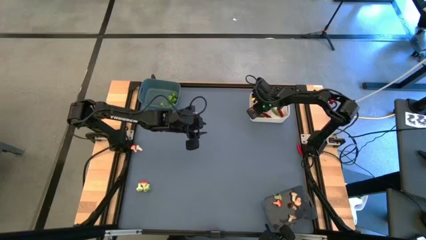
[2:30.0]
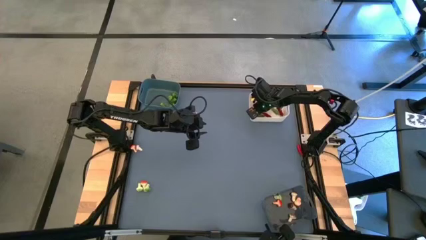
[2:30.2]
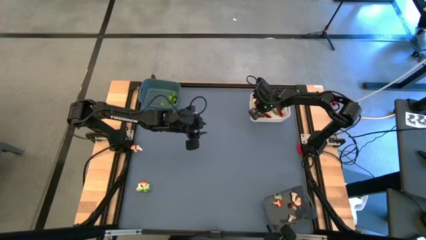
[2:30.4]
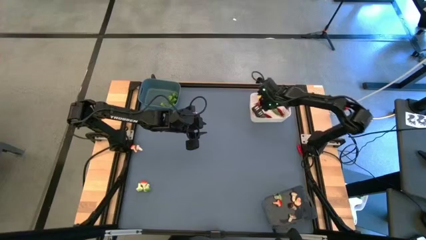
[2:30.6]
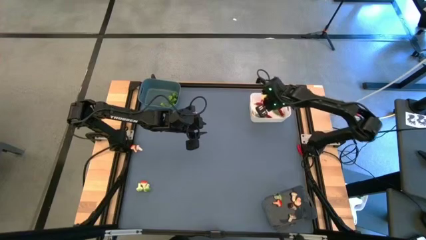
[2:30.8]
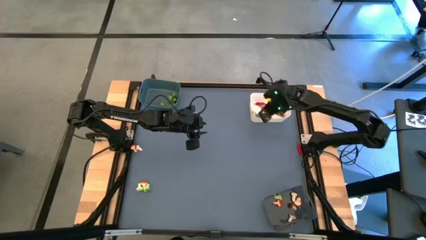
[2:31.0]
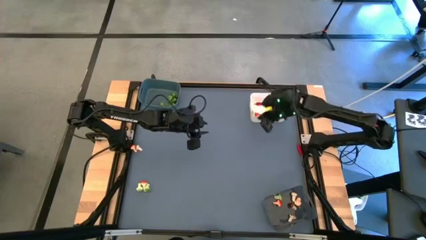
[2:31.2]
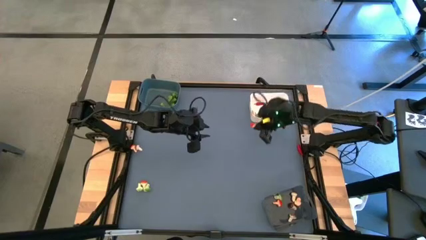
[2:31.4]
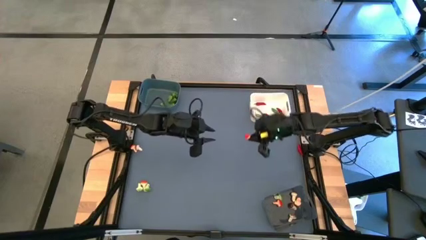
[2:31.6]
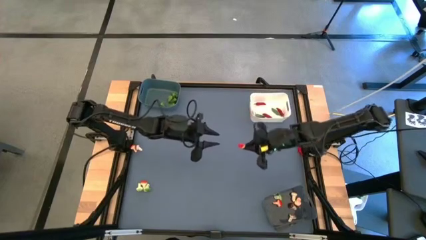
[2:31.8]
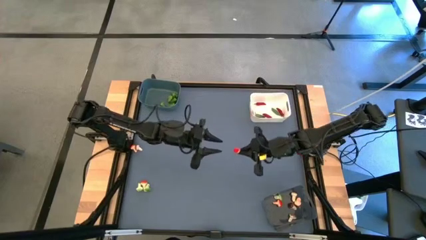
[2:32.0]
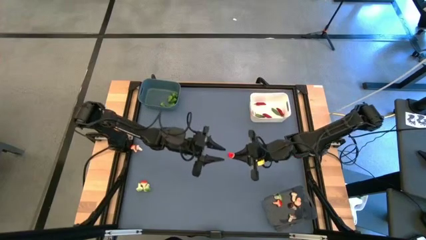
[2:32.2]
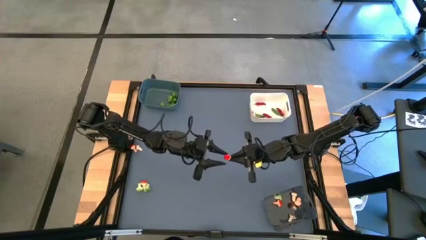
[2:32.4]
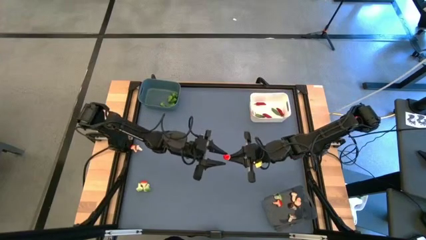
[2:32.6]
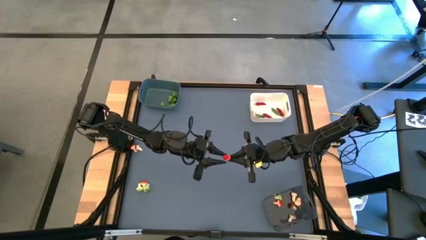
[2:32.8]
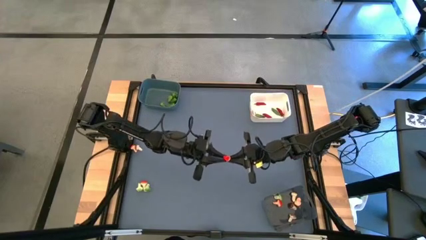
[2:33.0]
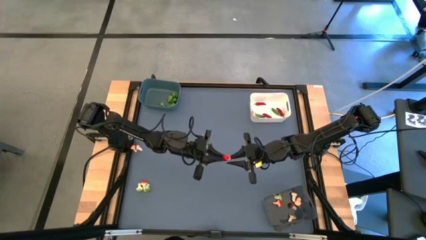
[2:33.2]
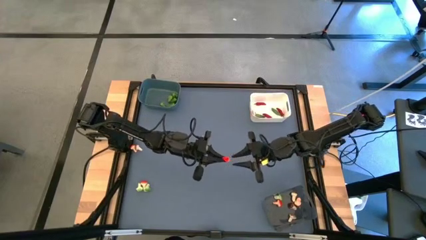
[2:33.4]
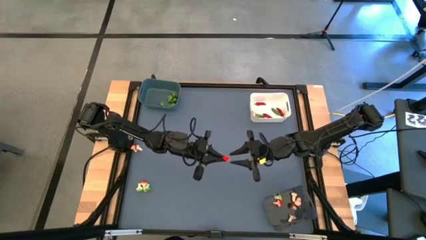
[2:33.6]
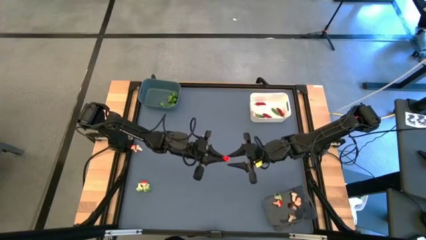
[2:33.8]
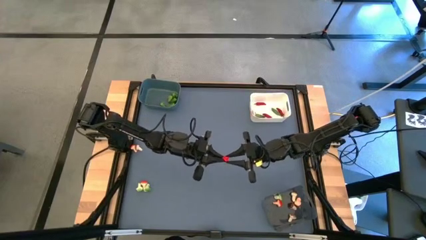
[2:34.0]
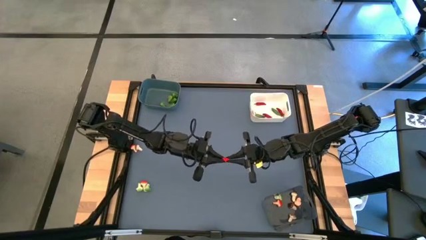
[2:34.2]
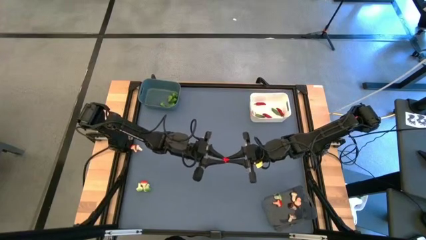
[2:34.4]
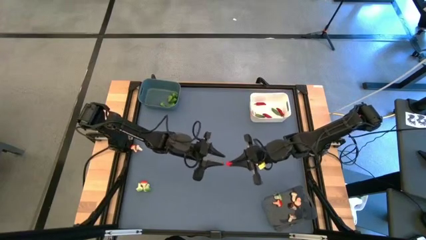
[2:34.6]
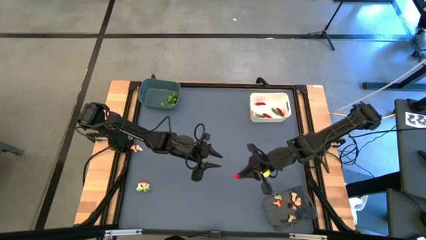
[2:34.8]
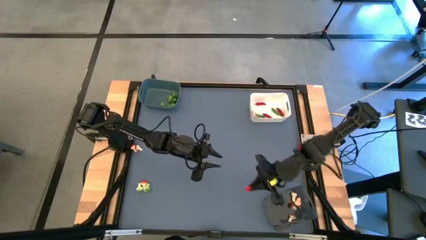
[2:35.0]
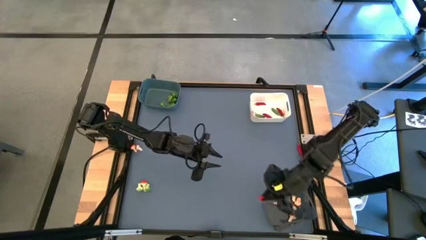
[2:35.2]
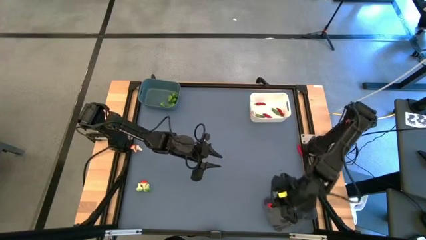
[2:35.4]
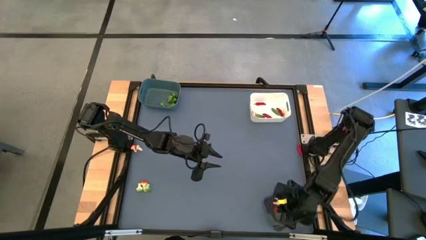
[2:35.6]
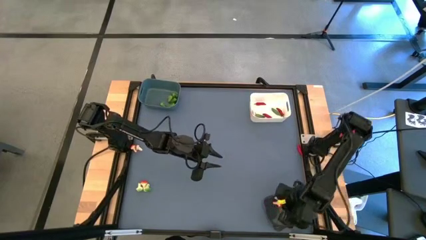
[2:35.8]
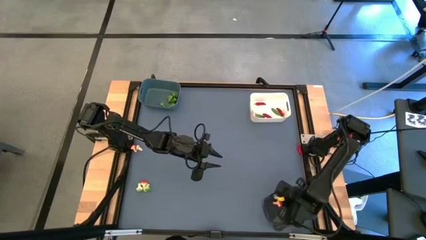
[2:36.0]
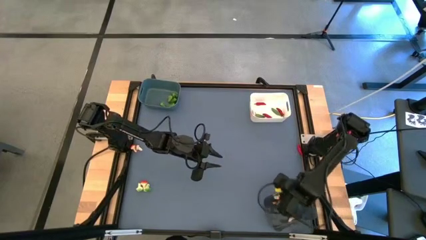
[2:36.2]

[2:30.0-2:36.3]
Task: Sort produce into baskets
Put the brown mushroom into the black bin

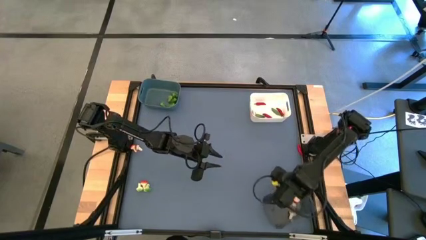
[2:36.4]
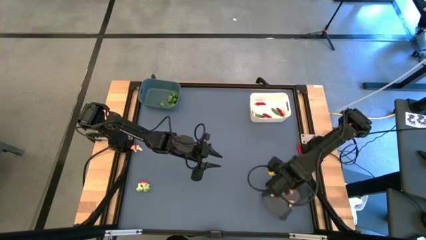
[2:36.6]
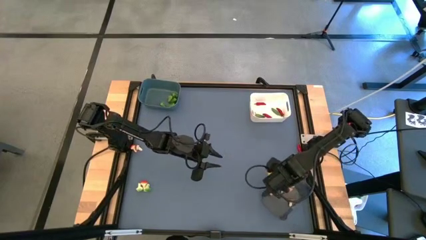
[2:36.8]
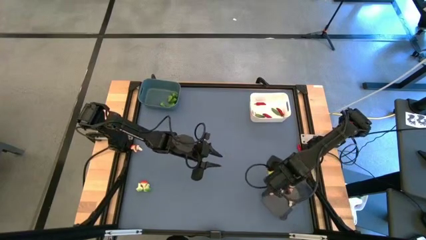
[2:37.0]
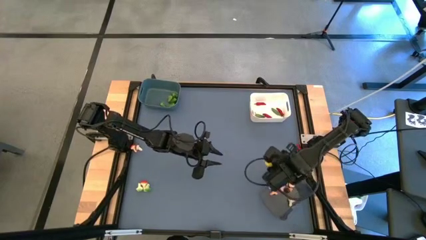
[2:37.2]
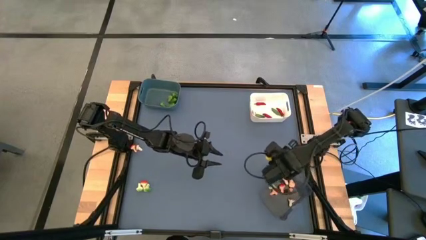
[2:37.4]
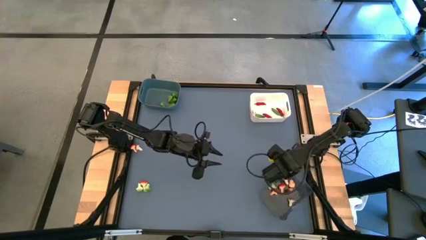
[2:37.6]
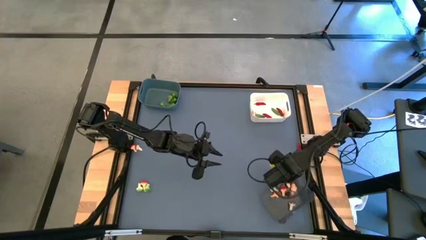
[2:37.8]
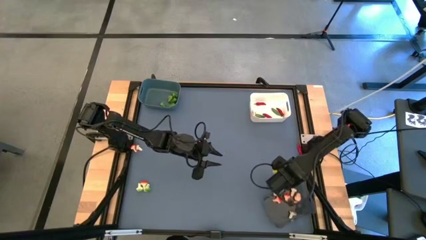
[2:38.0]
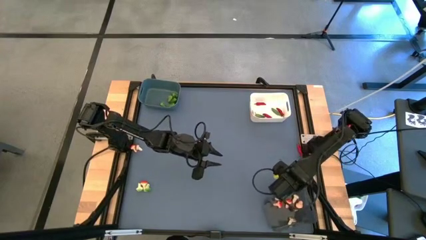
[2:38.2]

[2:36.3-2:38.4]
Adjust the black bin on the table

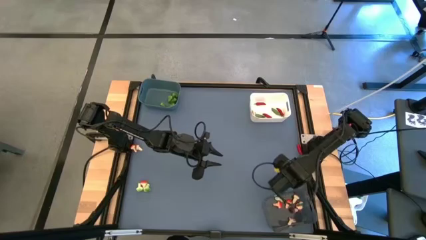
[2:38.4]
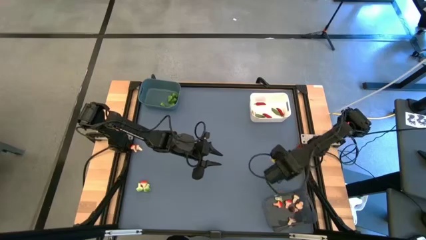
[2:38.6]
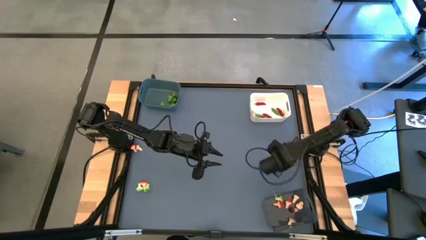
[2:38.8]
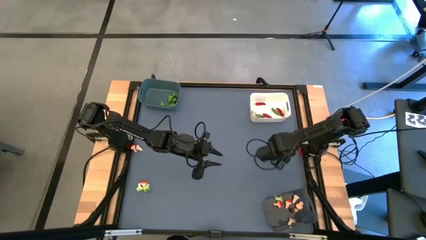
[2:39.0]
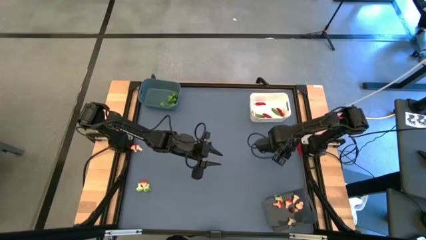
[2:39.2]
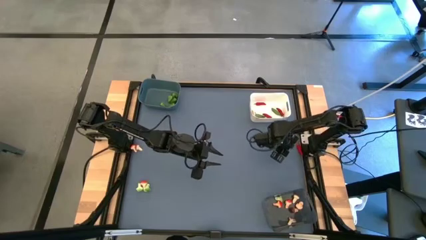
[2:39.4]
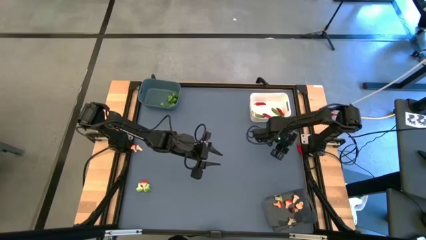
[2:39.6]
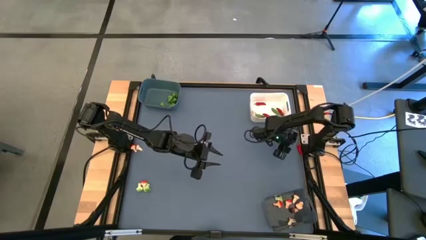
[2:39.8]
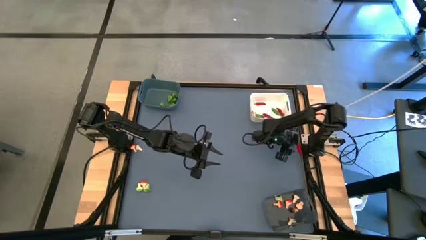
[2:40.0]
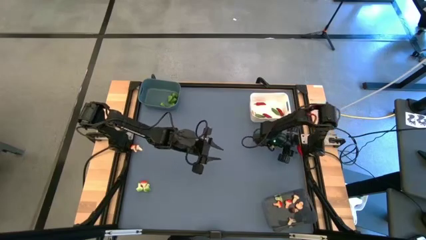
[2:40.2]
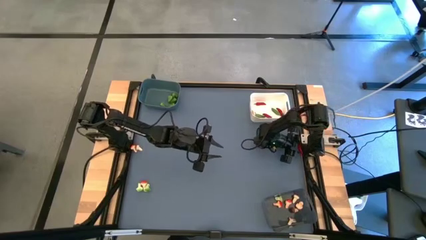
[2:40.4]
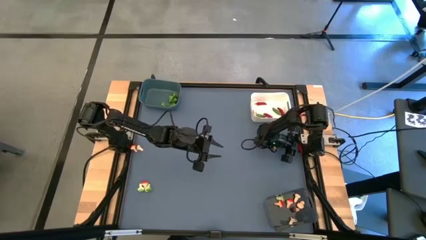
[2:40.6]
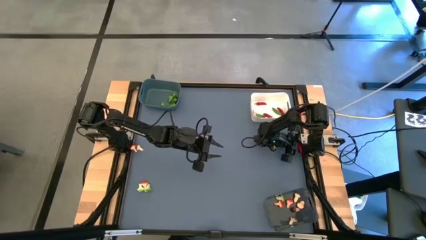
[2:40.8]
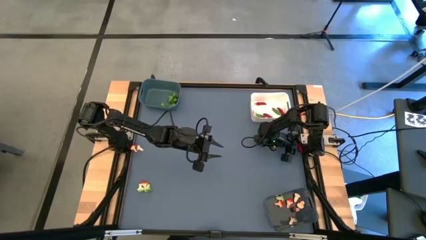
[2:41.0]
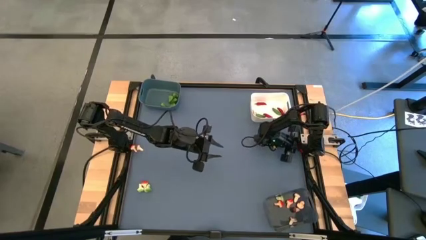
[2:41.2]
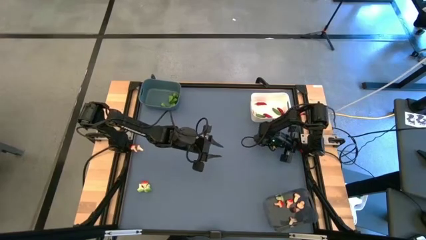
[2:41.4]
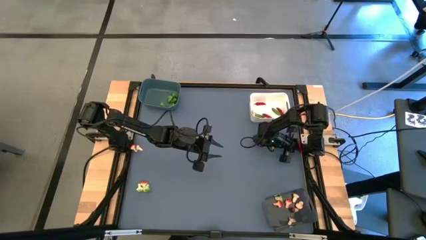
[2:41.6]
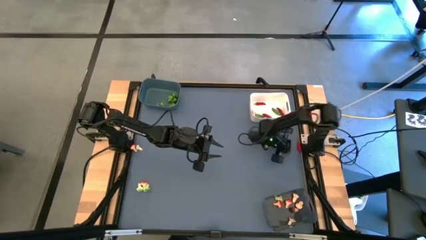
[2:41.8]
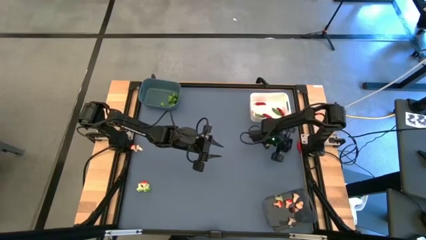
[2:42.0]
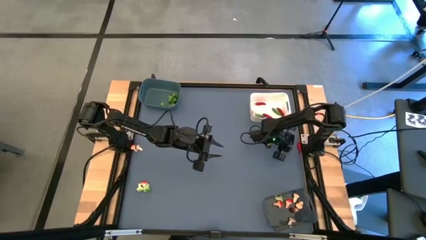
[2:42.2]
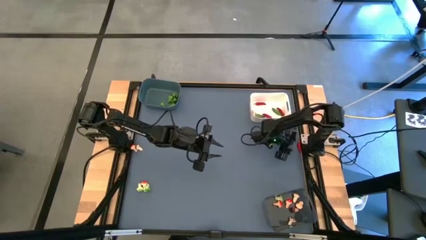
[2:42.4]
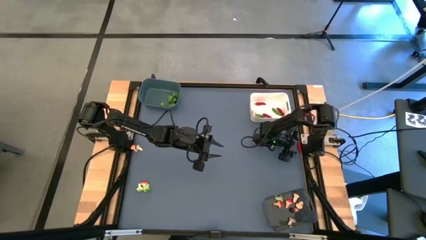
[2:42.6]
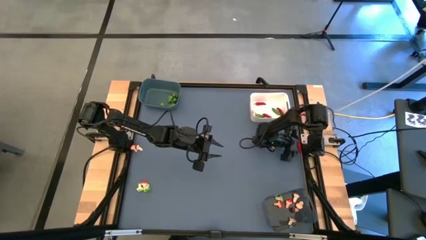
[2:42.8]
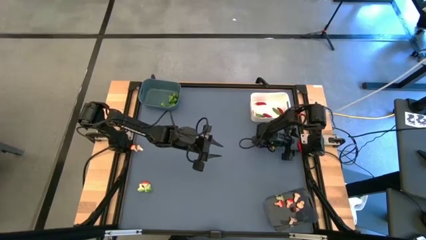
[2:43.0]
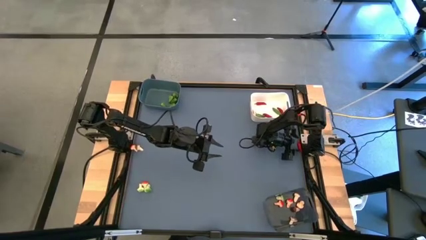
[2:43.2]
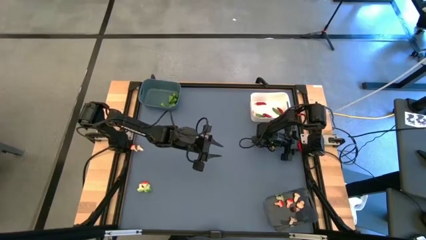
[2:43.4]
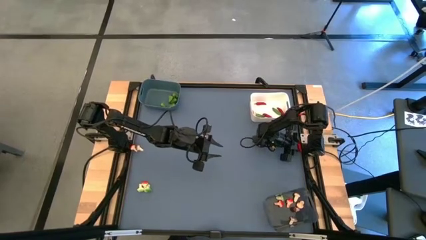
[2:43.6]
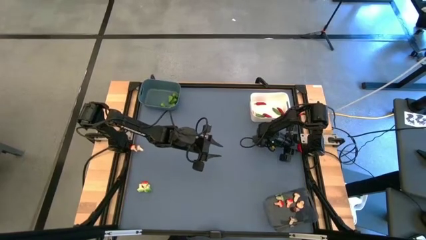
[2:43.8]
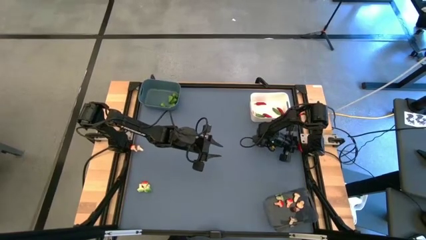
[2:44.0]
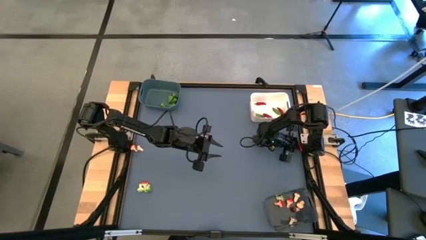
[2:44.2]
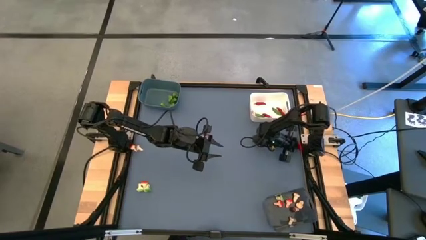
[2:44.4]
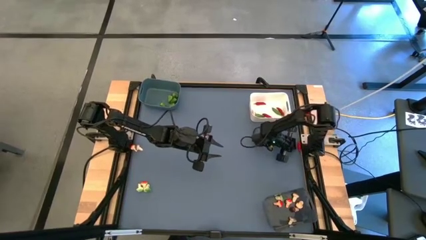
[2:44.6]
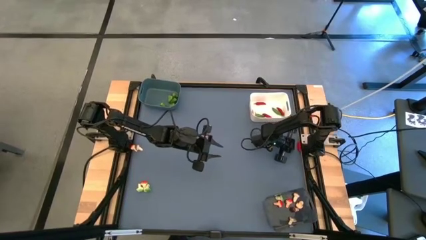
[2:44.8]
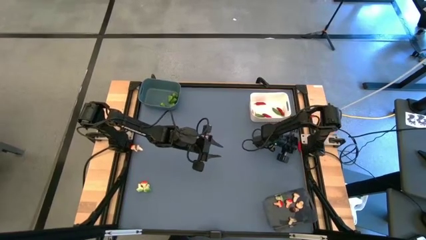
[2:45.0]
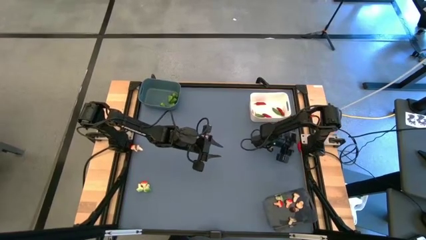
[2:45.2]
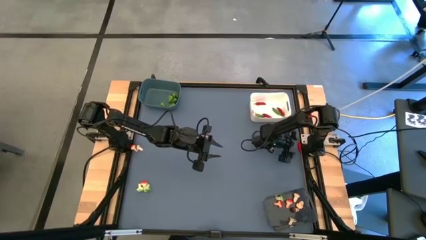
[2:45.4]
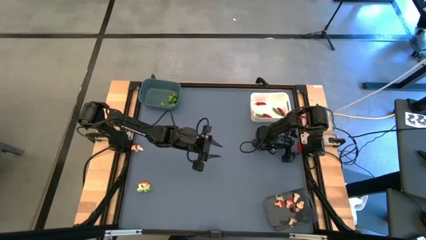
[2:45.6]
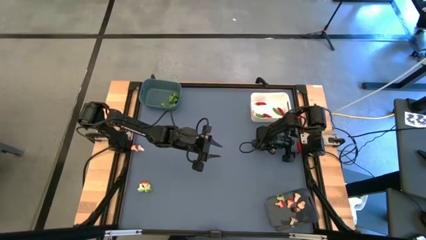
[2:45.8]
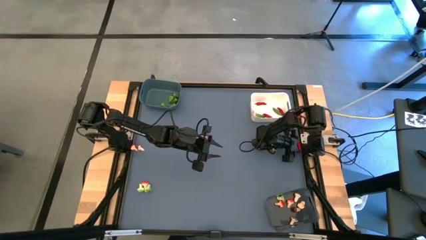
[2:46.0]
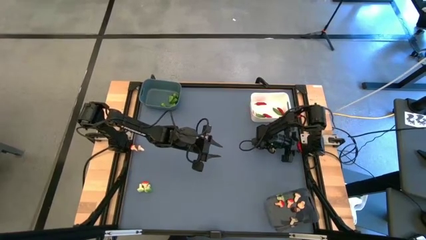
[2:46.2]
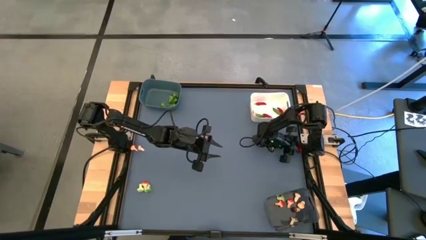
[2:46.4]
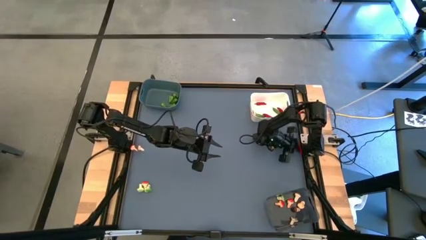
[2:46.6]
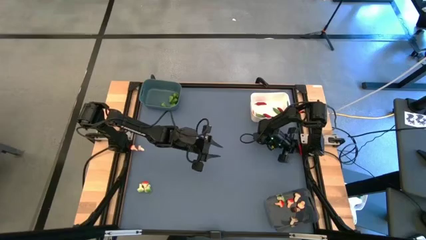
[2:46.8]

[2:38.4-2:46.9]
Put the red chili pepper into the white bin
